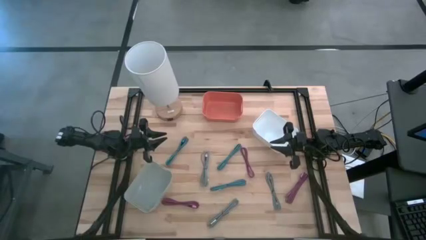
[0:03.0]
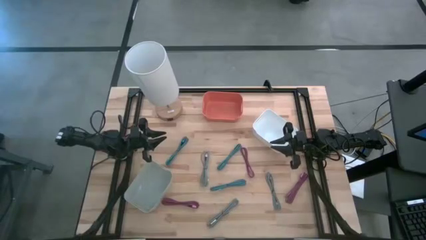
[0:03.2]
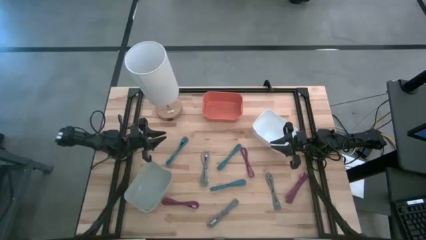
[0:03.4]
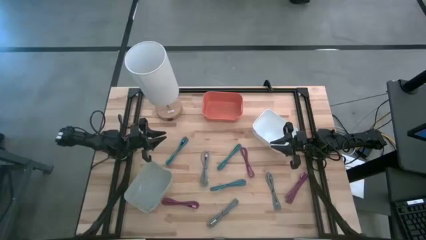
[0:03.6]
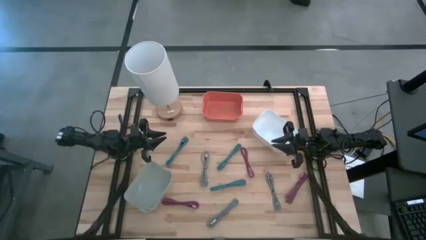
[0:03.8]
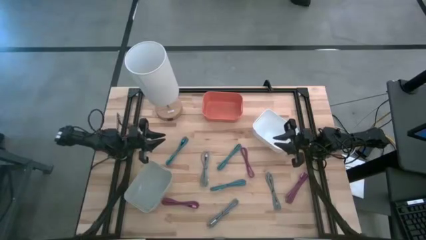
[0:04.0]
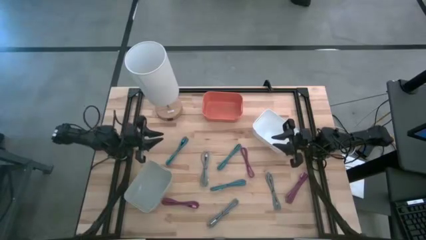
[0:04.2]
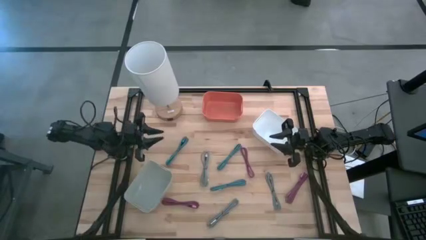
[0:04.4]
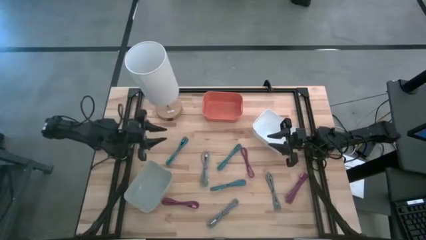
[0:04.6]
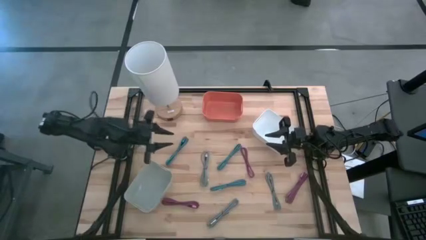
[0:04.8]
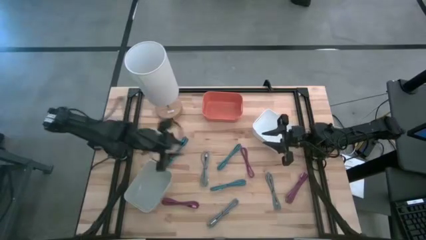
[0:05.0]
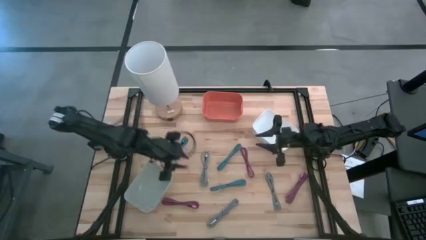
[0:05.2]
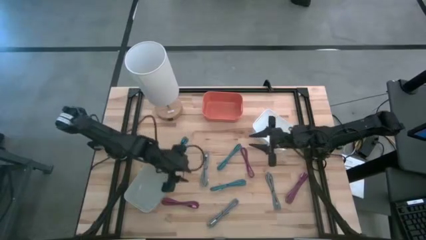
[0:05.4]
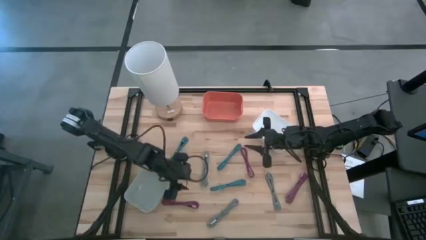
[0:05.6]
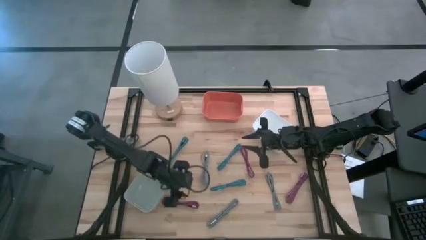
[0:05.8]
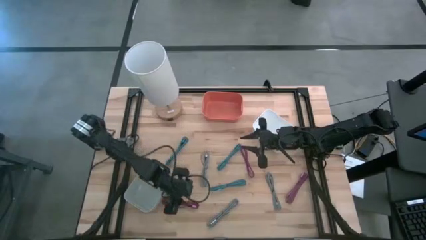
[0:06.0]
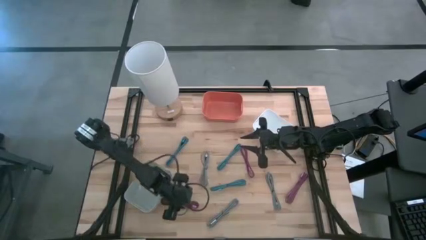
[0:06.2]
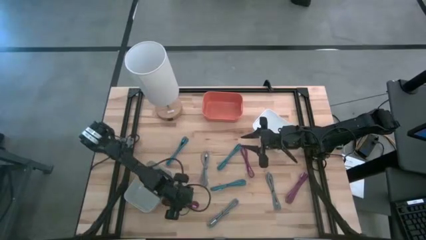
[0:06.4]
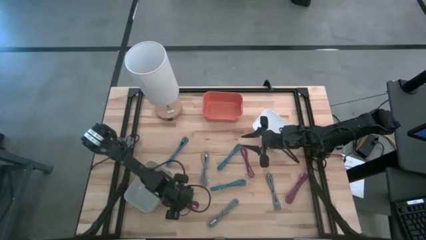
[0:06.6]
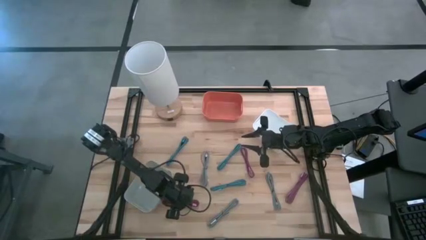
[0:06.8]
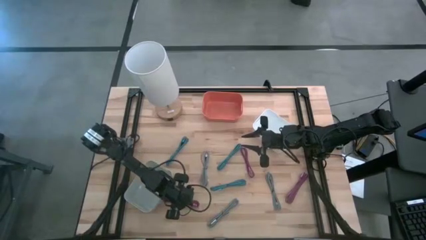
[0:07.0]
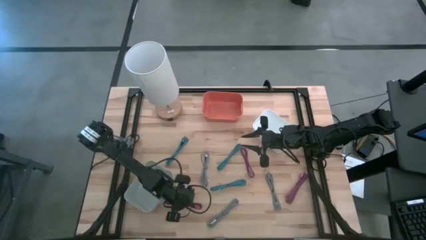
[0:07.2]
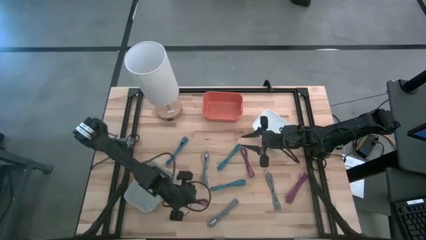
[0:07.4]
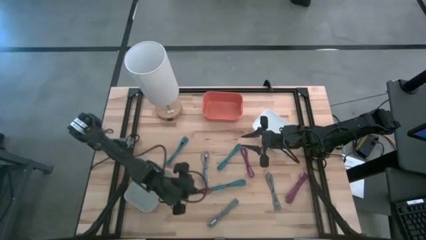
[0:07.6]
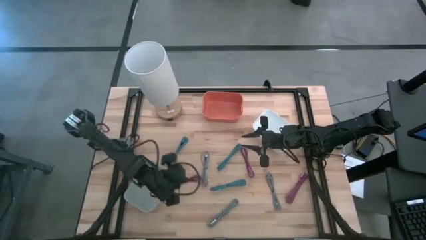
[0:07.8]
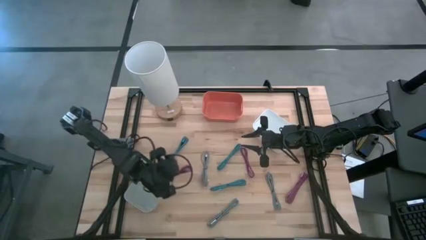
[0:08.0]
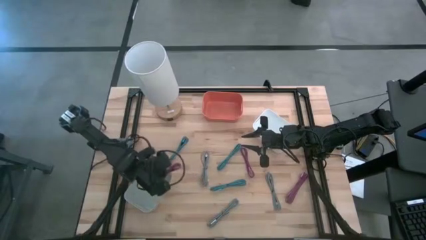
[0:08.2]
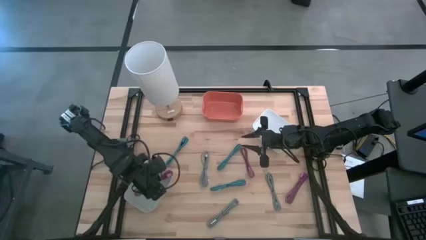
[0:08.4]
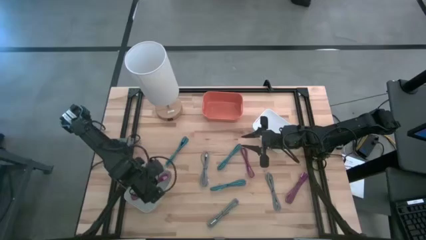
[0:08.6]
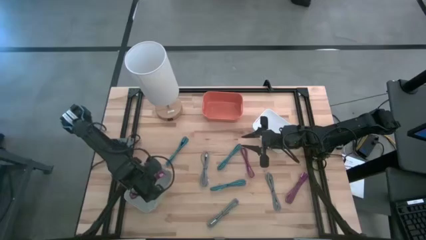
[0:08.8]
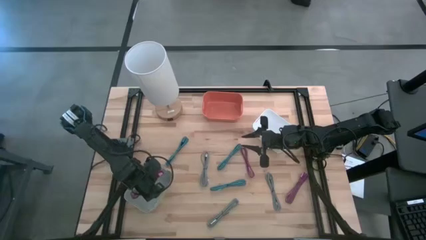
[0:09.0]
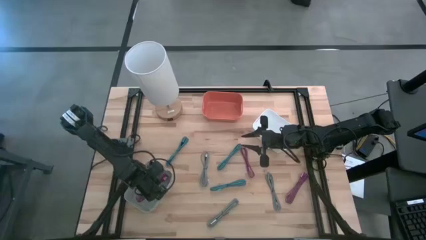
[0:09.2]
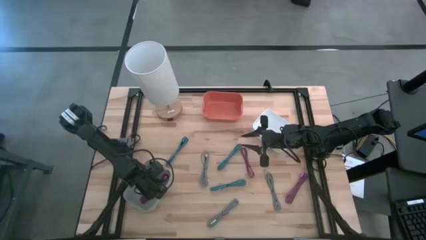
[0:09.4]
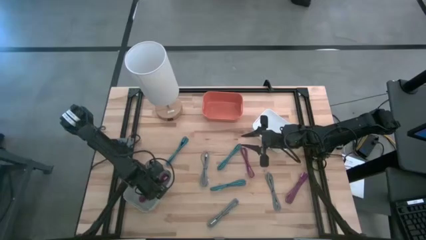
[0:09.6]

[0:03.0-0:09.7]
Task: Pick & Place USB Port
Put the bottom left black and pink charger cable into the gray bin

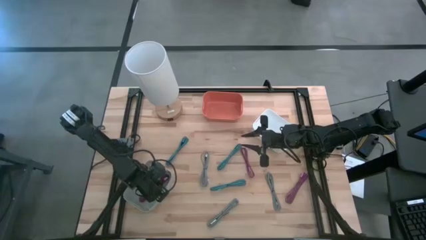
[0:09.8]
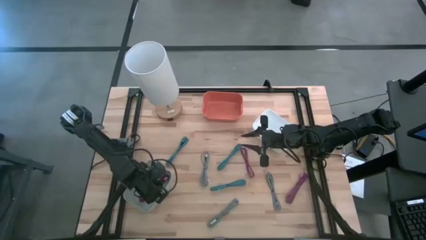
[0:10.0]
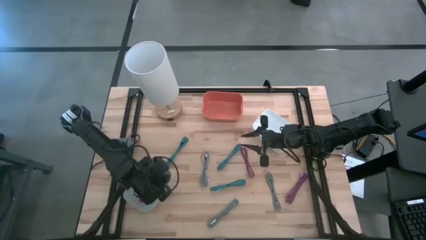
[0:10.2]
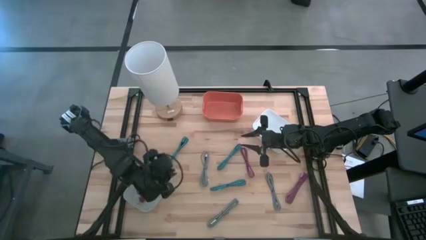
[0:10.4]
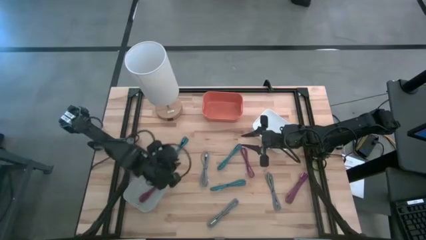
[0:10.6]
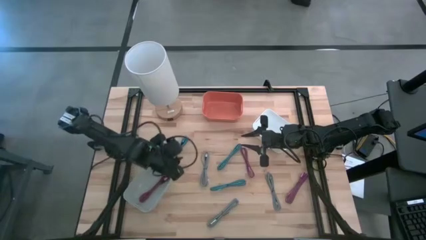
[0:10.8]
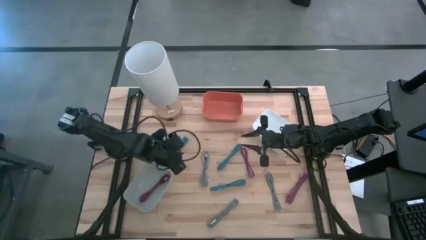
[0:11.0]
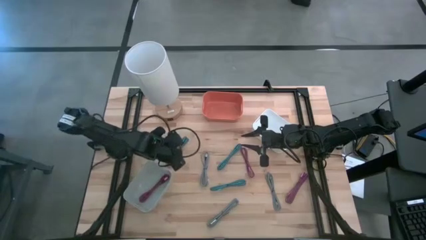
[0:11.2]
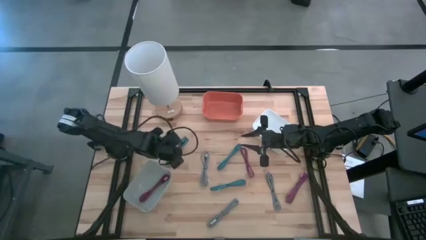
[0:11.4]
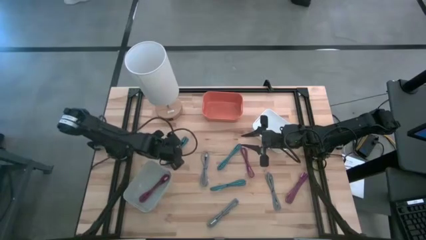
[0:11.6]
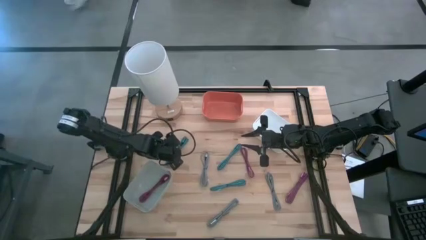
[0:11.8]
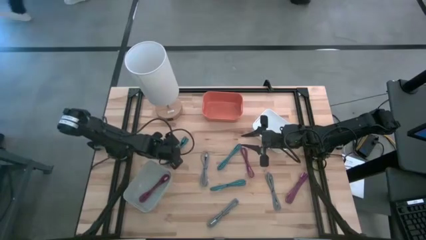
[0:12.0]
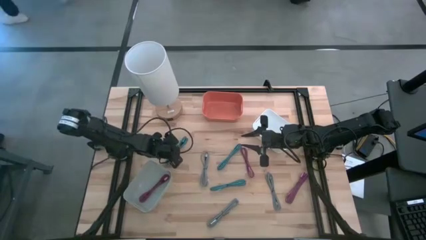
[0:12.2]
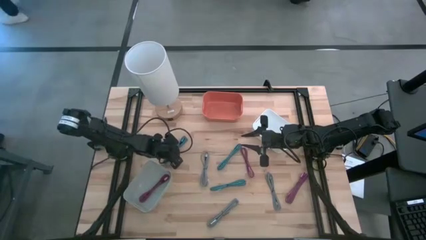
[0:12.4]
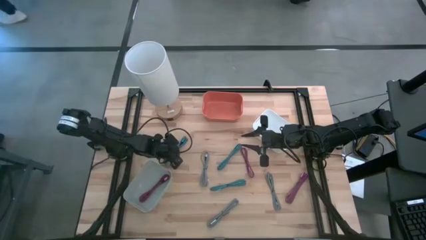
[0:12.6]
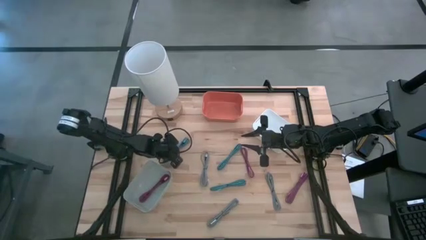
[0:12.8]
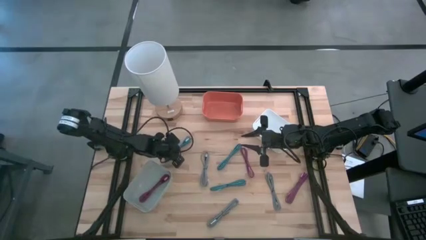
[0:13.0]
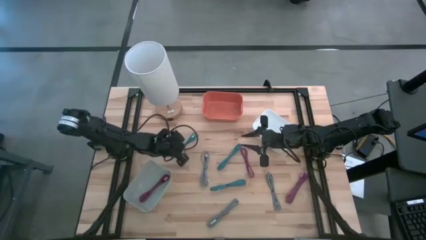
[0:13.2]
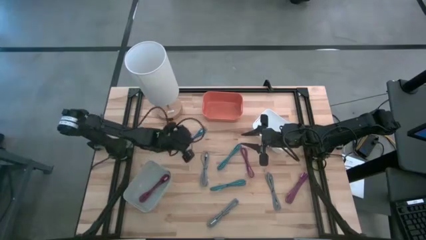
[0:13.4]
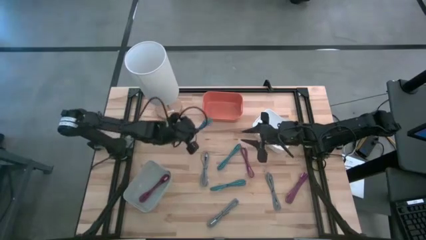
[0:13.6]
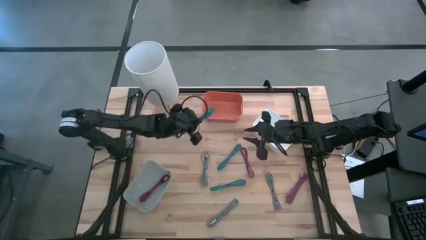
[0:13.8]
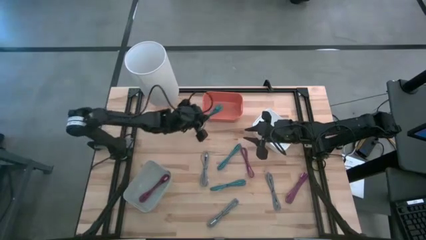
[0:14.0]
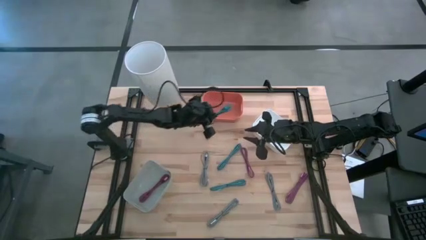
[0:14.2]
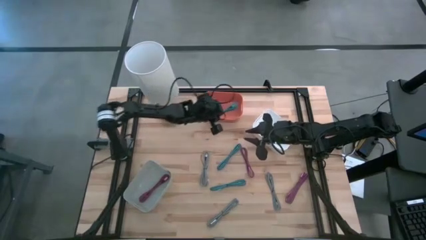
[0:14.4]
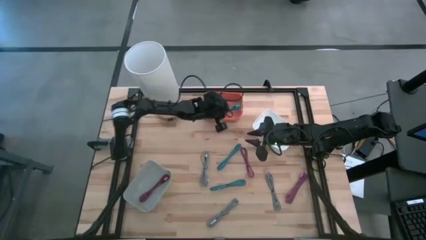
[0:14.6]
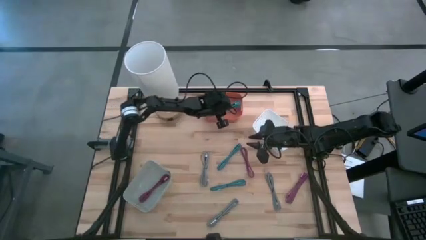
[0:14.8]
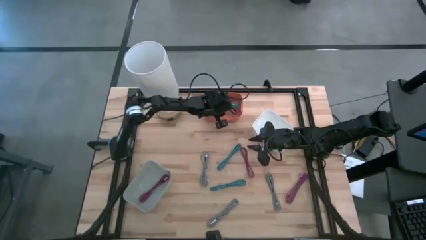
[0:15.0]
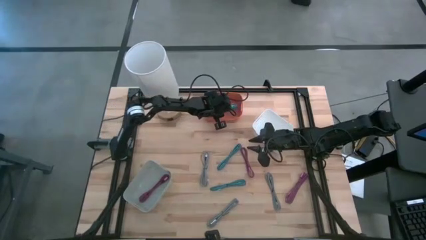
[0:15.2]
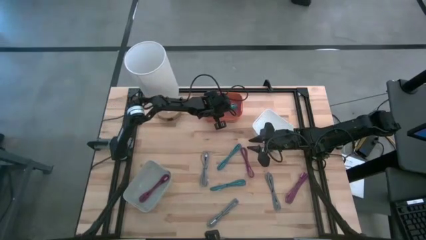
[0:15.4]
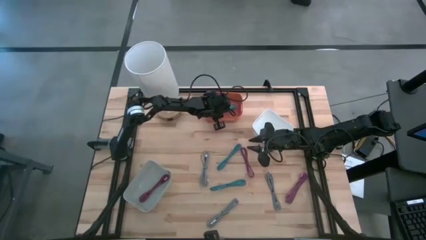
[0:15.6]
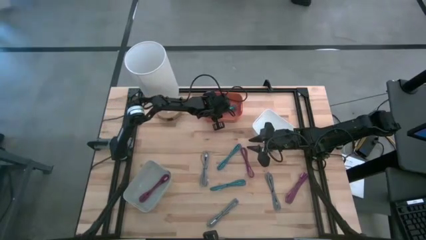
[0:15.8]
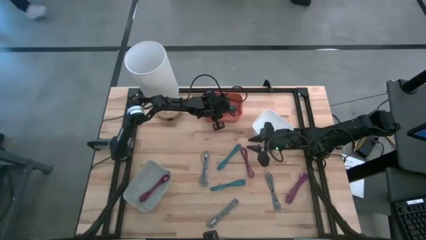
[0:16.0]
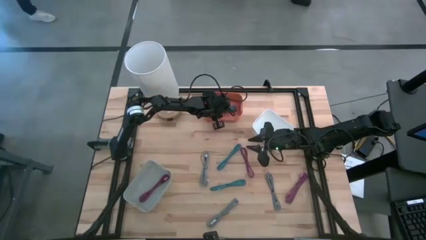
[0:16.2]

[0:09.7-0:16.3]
Put the top left blue and white charger cable into the orange bin

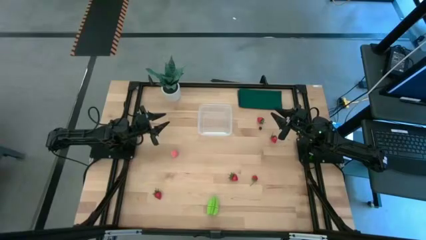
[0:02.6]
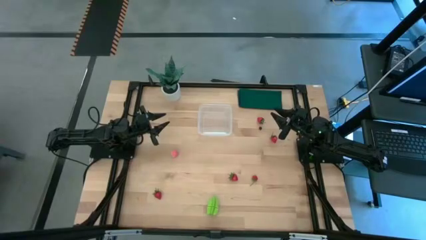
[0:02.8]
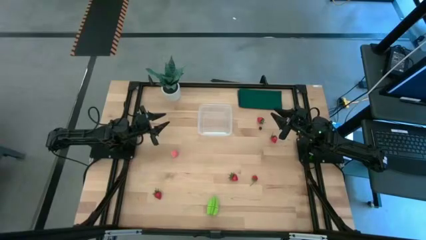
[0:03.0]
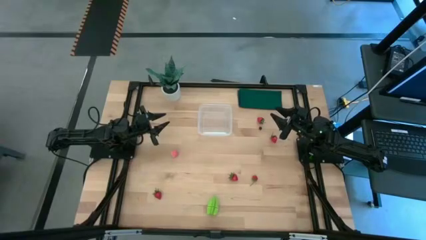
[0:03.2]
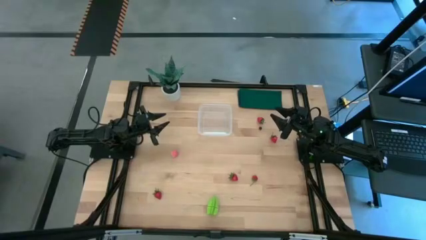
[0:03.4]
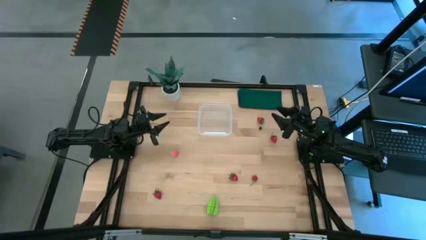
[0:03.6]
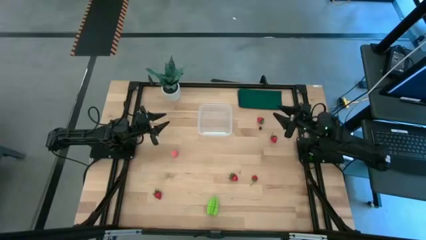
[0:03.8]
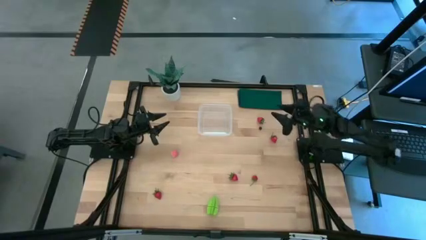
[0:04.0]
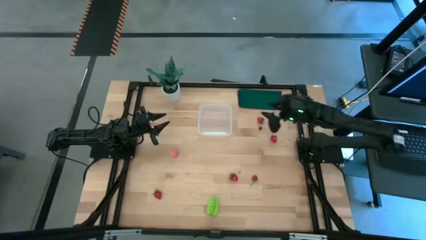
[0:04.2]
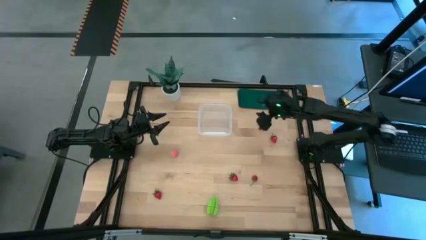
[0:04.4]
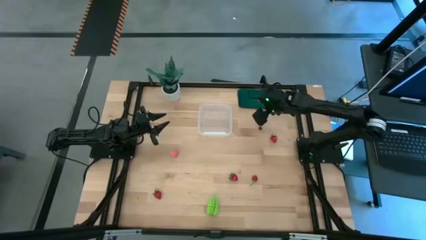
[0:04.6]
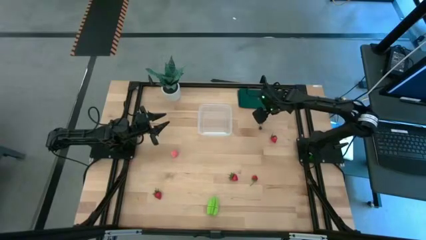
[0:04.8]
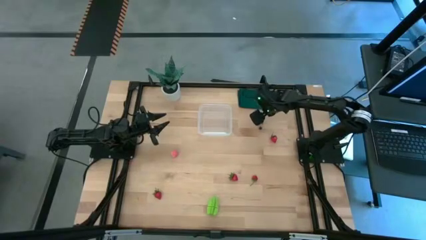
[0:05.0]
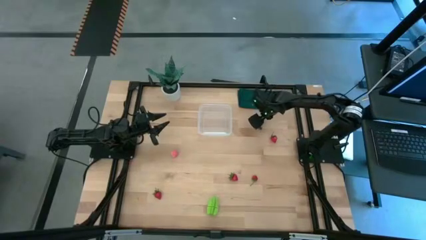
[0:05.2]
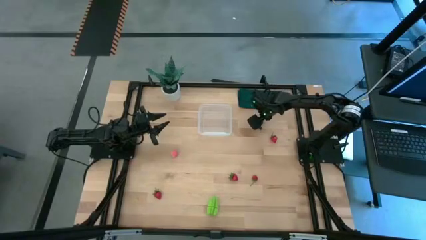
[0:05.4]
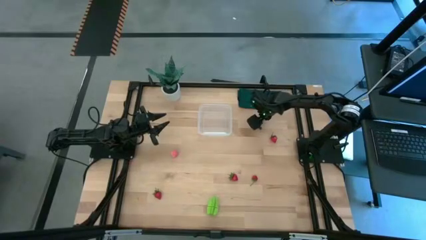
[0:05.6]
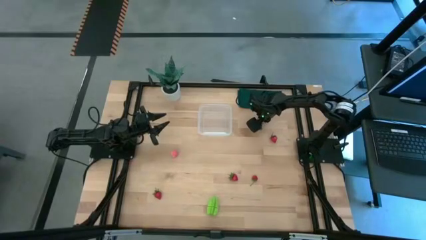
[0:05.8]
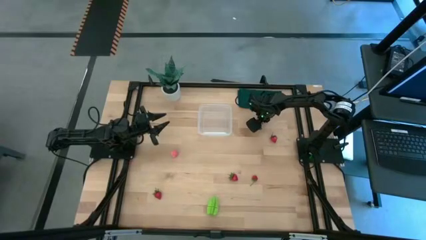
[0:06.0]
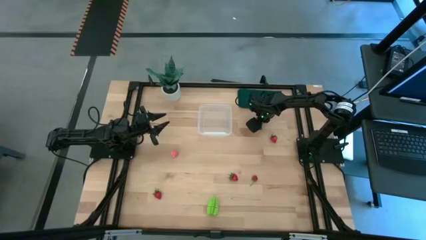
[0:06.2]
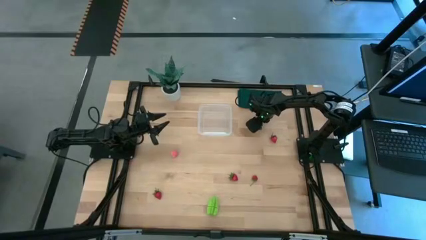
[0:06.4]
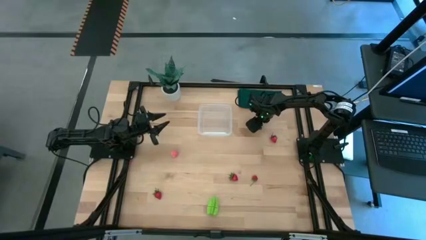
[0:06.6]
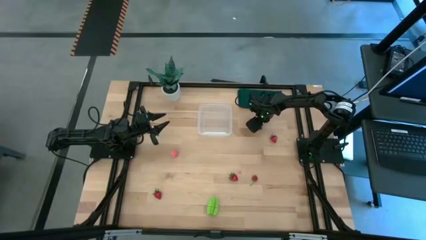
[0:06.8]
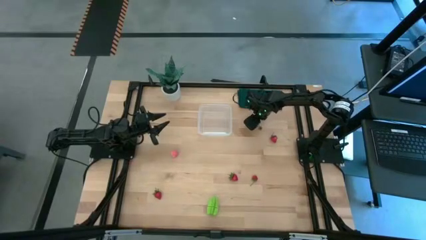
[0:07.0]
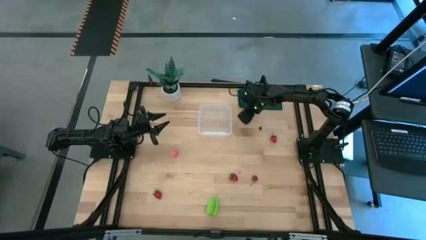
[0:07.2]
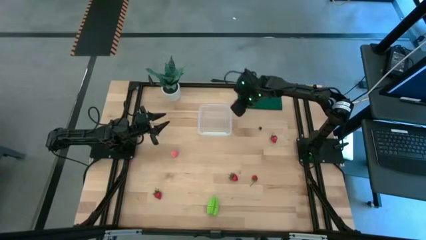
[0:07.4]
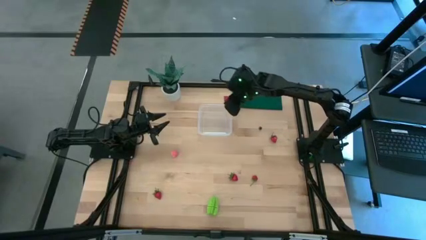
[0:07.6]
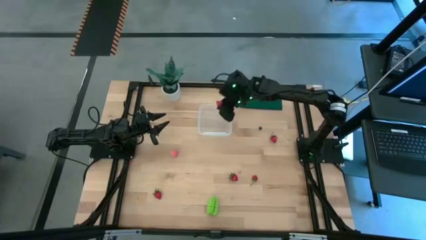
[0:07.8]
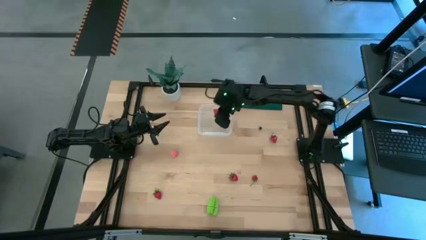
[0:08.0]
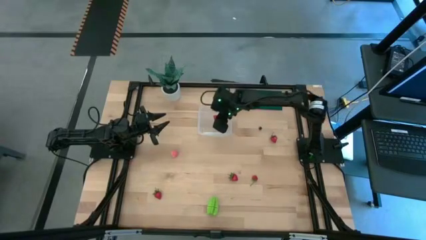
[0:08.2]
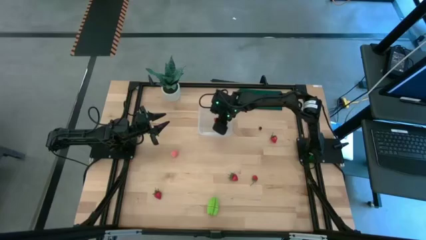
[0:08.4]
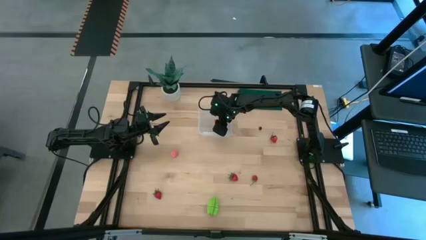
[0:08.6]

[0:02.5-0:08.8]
Task: Pick and placing Produce into tupperware
Put the strawberry into the transparent container
